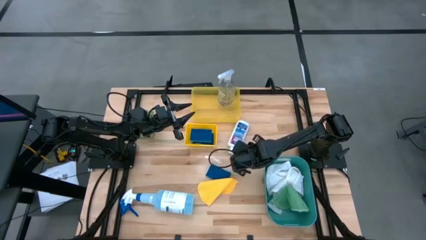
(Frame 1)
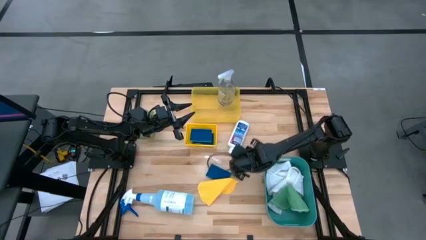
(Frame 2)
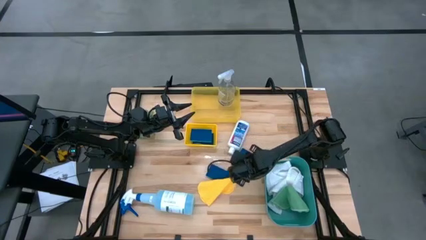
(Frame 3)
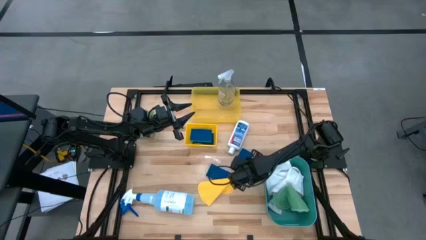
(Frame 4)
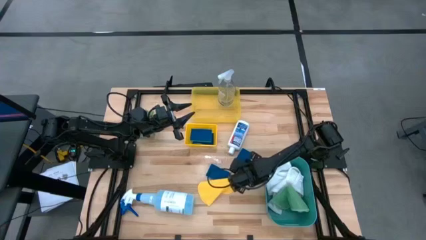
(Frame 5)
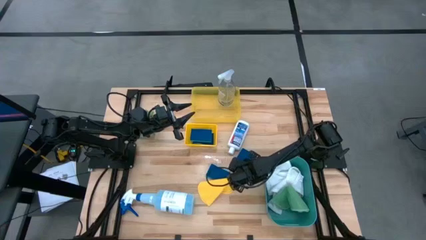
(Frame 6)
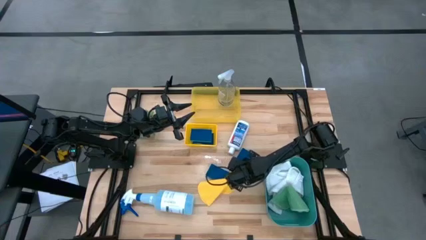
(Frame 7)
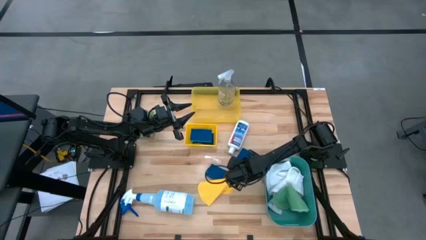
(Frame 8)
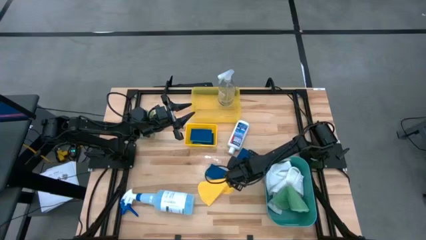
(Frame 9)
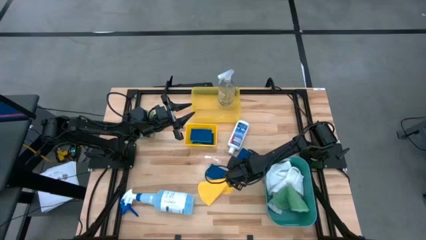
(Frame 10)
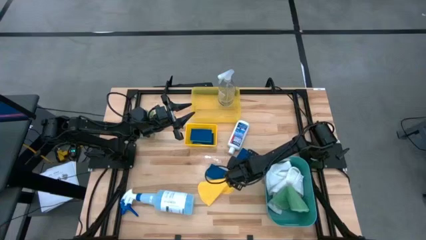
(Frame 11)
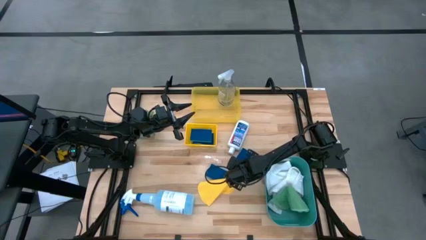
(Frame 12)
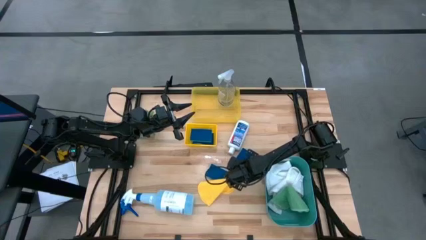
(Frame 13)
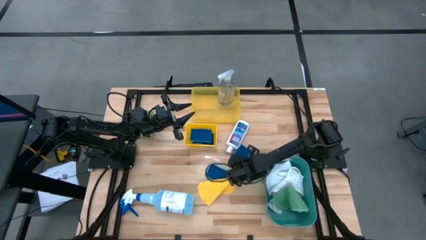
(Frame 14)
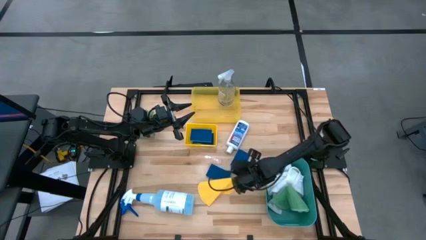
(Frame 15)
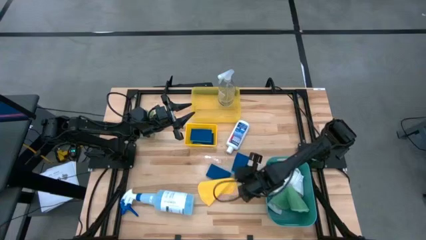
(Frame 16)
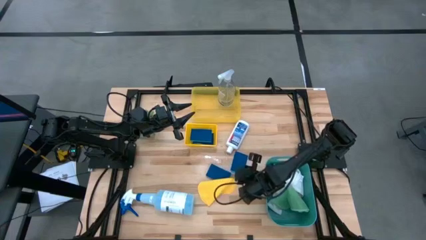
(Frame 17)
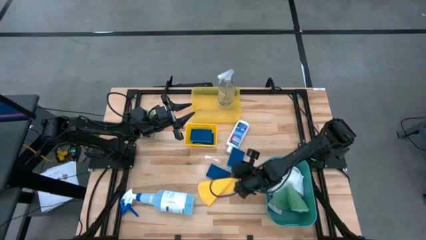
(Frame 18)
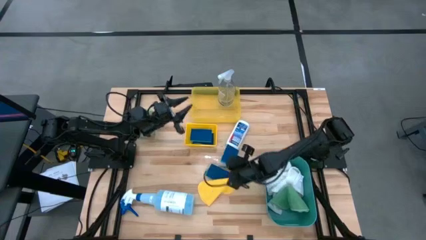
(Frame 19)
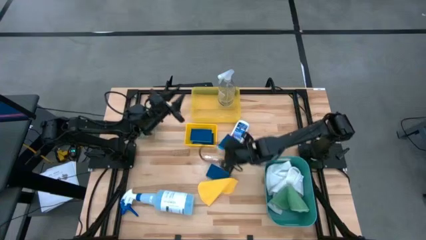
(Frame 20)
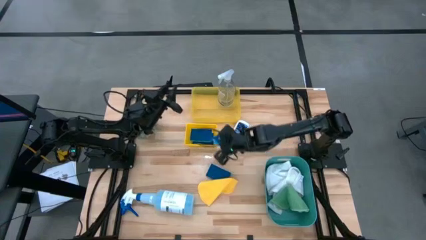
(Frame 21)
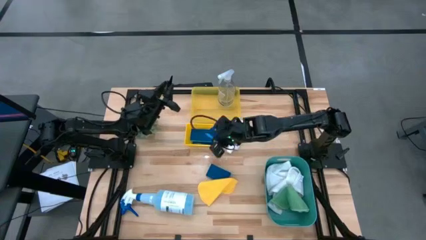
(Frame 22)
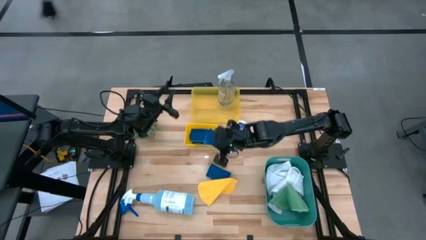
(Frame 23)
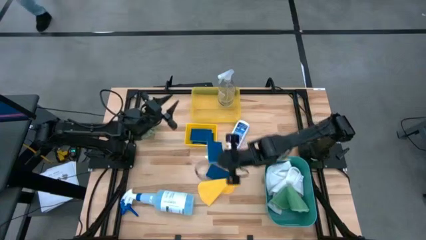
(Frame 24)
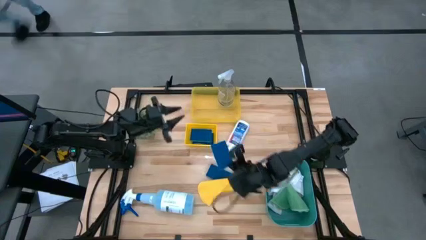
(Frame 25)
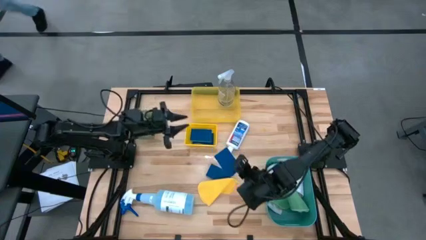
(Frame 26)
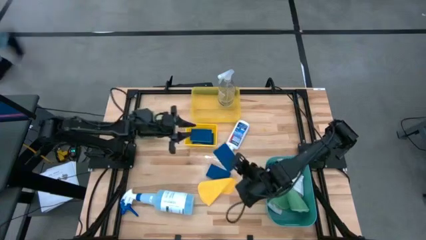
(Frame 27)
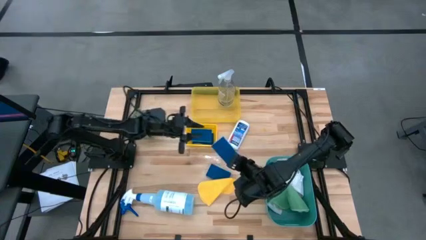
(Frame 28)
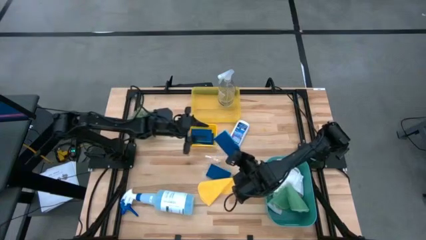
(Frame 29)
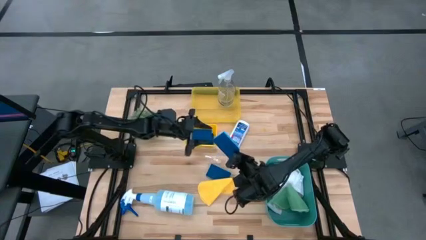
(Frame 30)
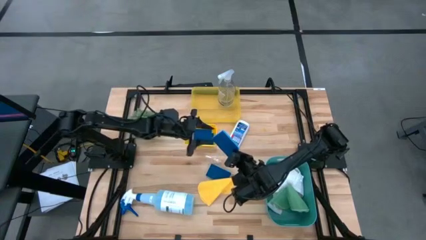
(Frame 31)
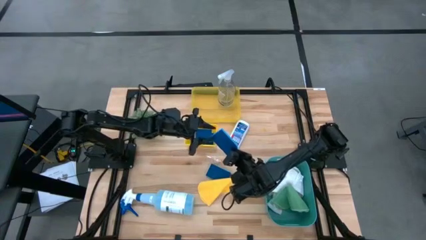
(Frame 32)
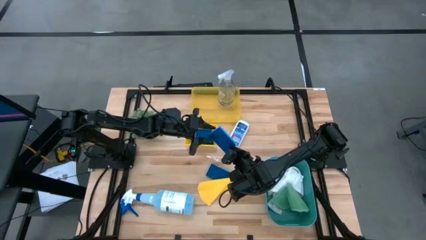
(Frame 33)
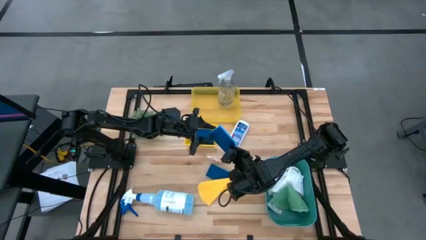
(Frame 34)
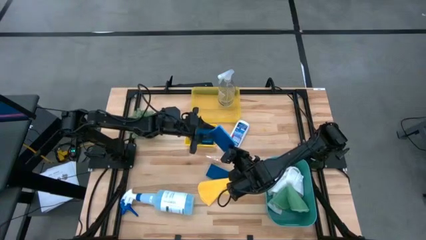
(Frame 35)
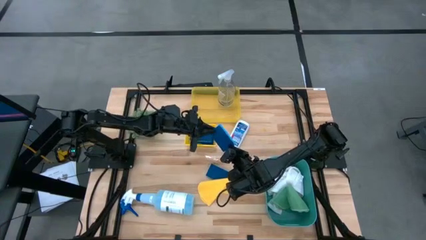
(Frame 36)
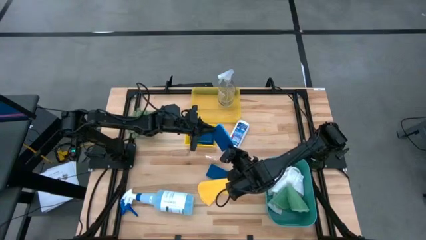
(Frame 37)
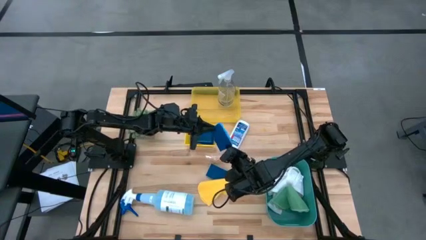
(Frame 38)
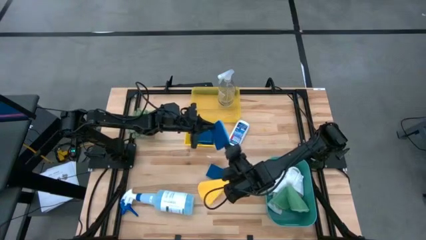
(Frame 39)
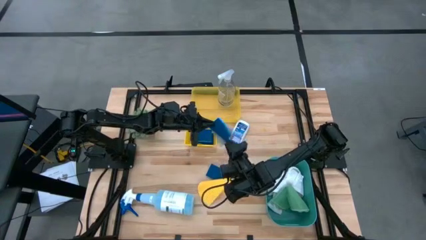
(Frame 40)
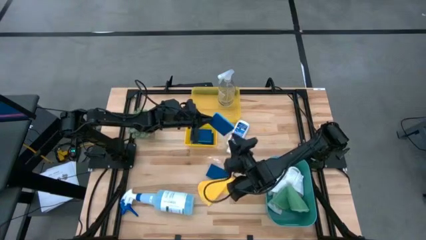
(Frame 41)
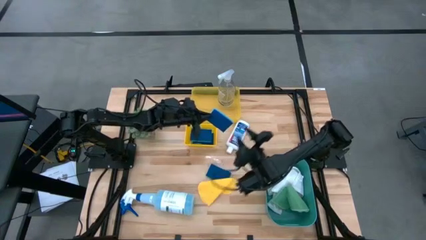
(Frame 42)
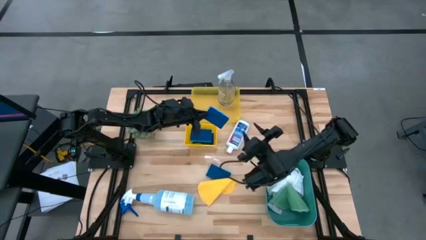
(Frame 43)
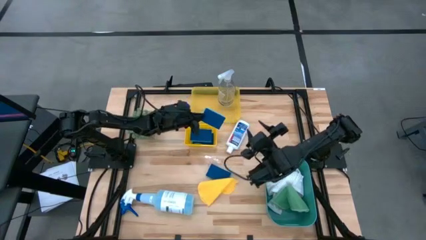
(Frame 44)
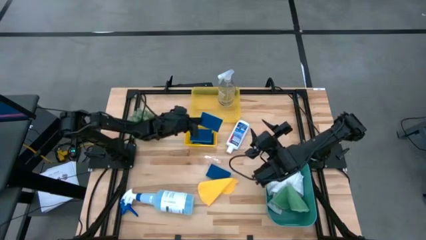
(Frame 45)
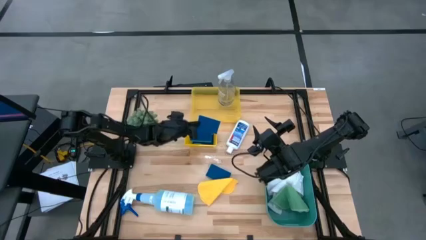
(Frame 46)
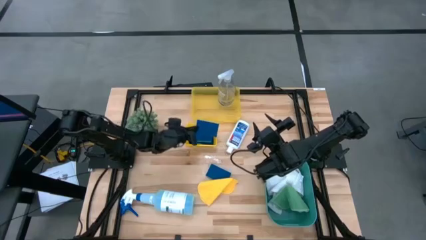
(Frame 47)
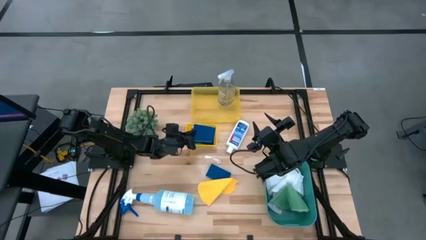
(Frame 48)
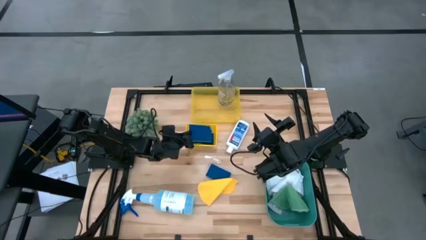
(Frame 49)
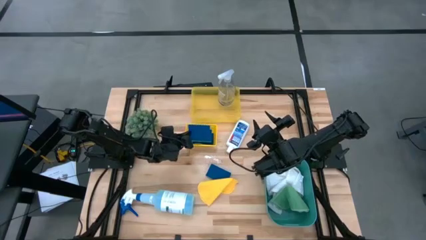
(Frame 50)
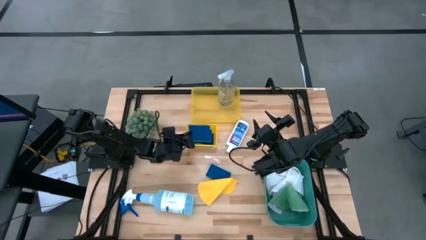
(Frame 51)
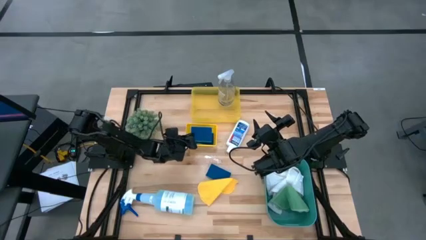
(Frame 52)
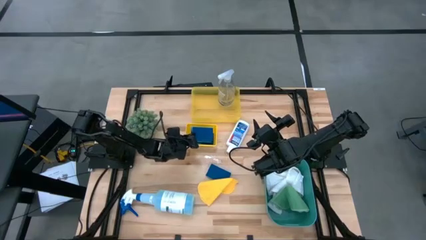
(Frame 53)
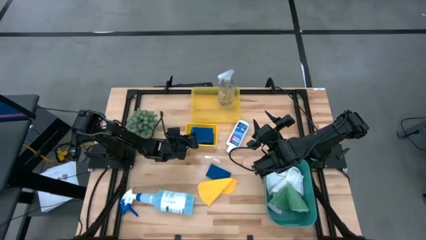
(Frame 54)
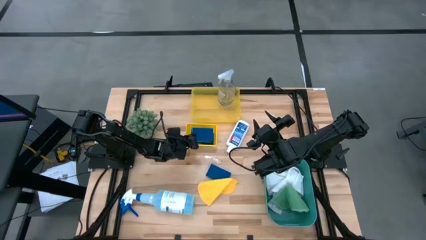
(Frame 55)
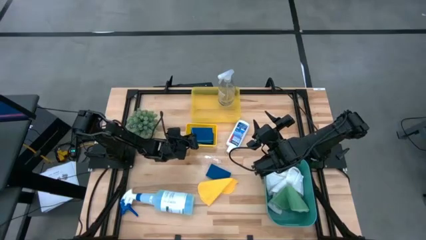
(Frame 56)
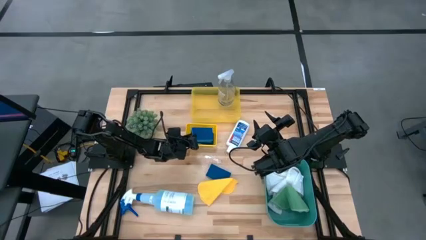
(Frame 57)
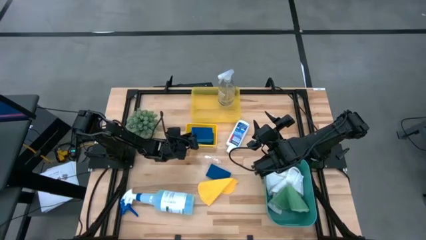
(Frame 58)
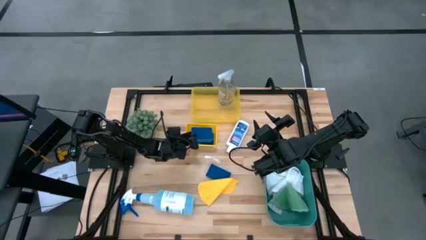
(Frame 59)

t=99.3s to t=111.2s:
Task: Pick & Place Kitchen Items
Put the blue sponge into the bottom yellow bin
